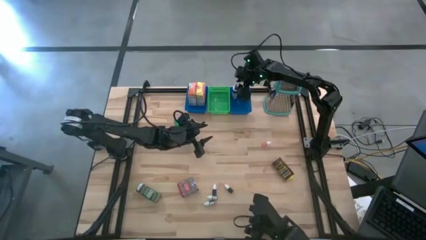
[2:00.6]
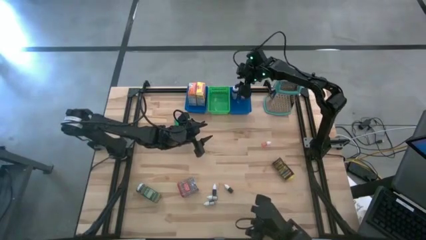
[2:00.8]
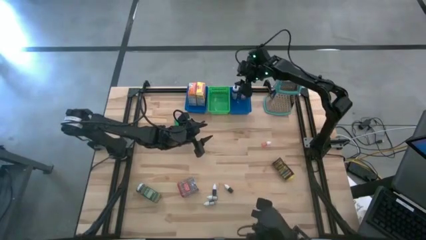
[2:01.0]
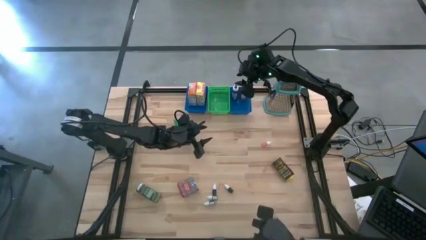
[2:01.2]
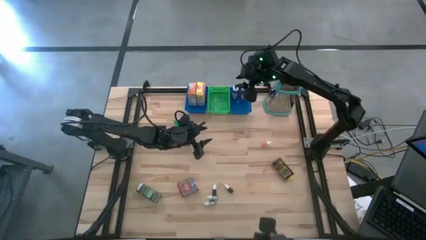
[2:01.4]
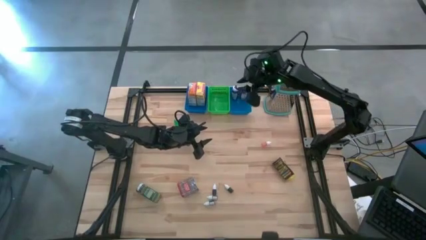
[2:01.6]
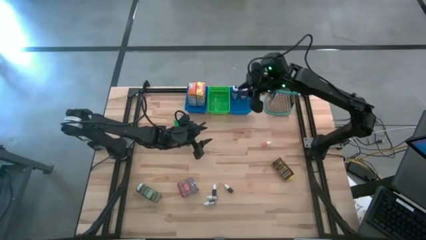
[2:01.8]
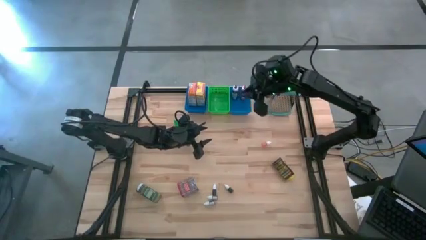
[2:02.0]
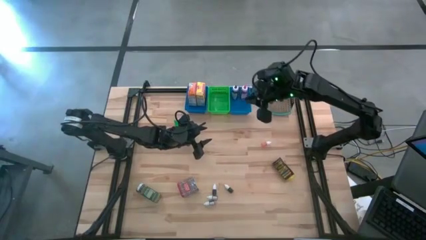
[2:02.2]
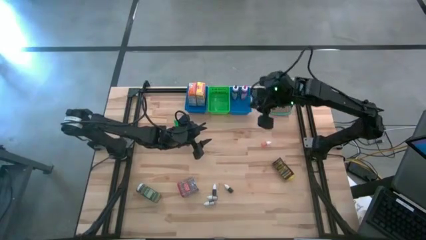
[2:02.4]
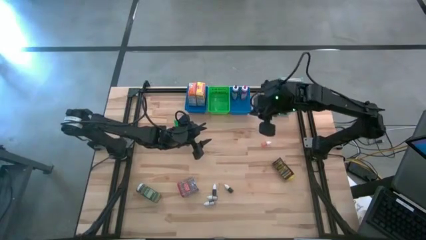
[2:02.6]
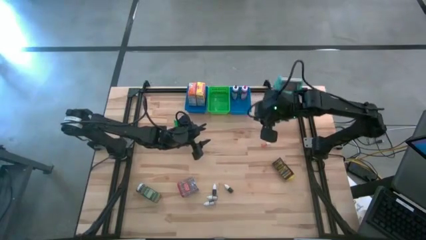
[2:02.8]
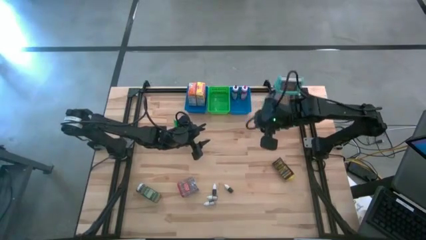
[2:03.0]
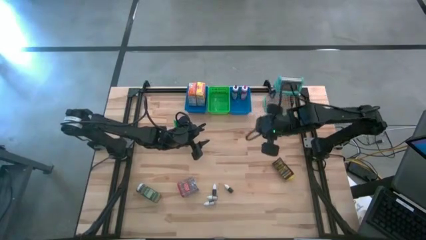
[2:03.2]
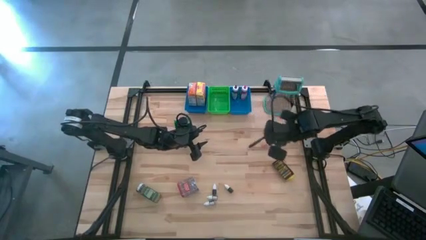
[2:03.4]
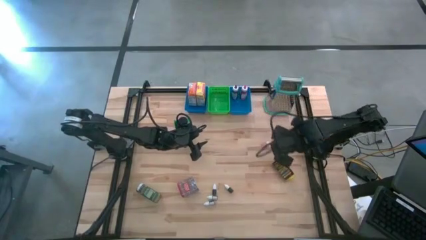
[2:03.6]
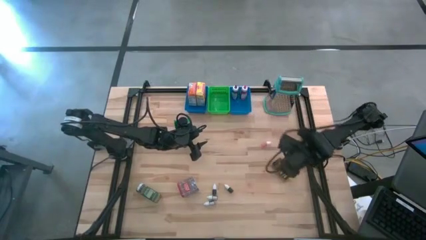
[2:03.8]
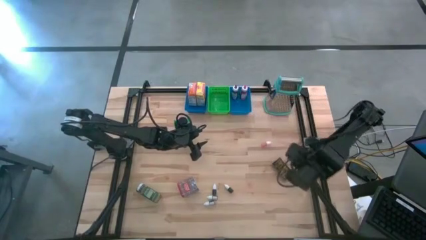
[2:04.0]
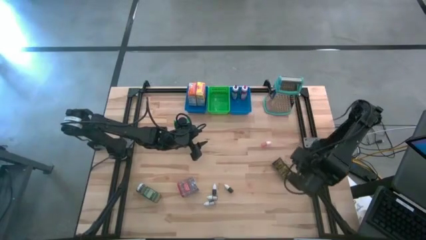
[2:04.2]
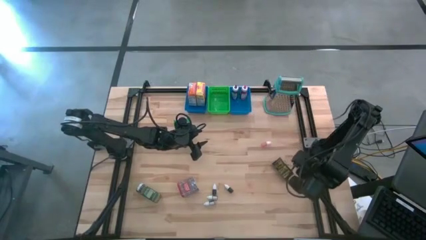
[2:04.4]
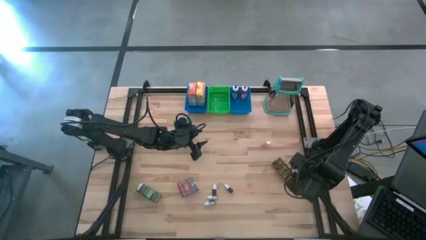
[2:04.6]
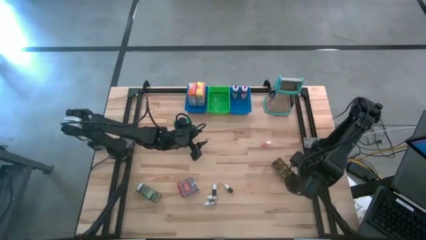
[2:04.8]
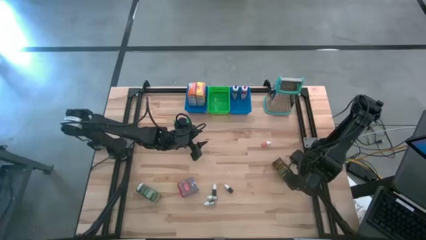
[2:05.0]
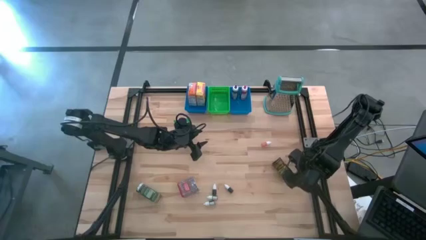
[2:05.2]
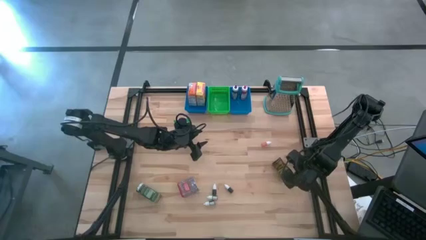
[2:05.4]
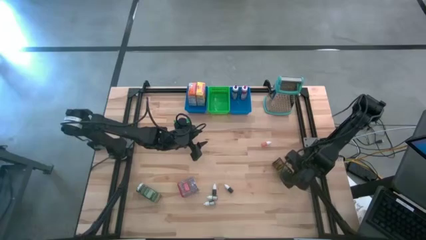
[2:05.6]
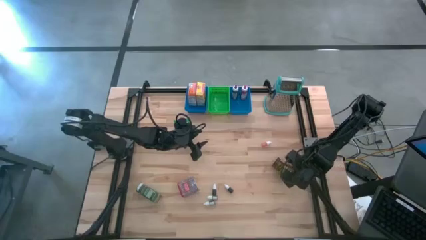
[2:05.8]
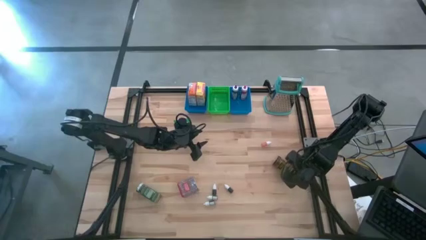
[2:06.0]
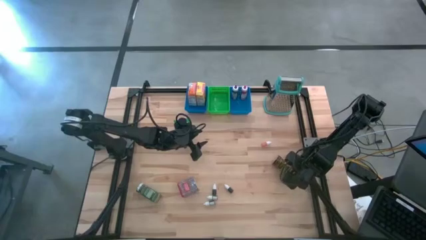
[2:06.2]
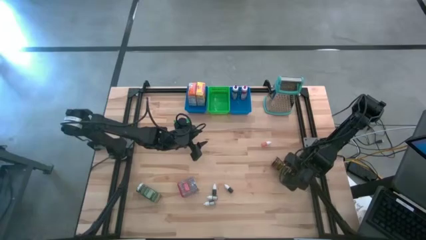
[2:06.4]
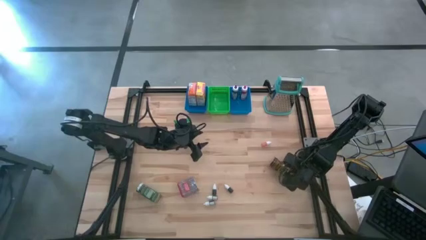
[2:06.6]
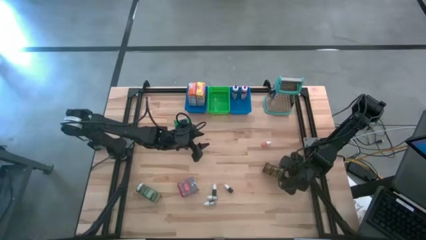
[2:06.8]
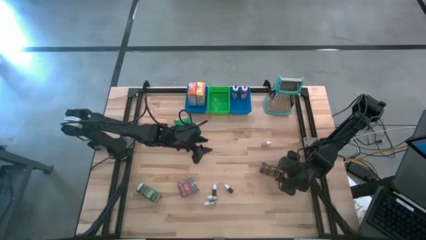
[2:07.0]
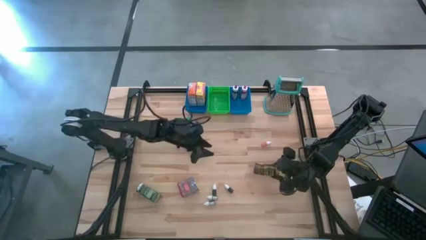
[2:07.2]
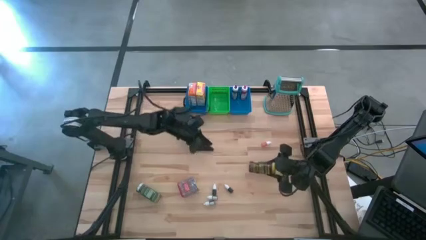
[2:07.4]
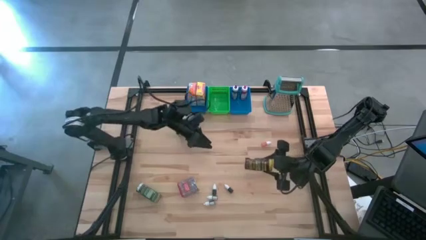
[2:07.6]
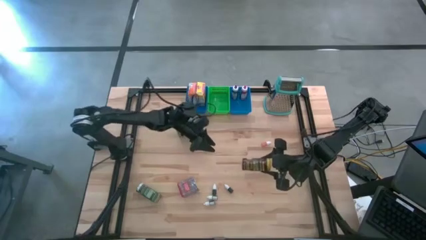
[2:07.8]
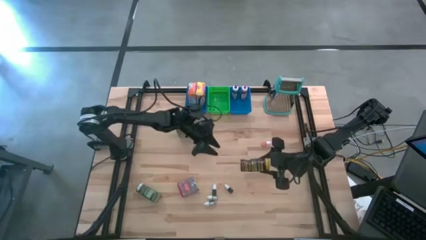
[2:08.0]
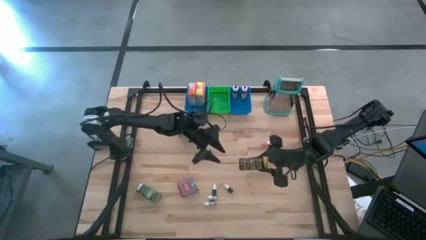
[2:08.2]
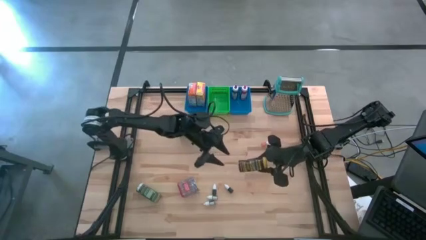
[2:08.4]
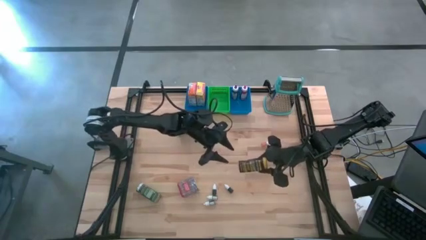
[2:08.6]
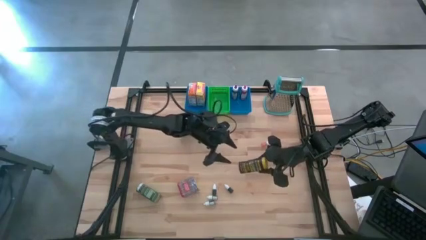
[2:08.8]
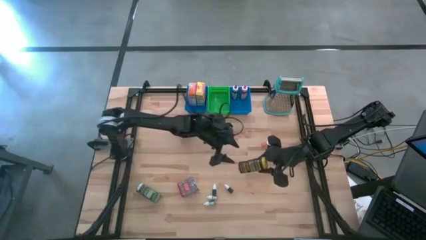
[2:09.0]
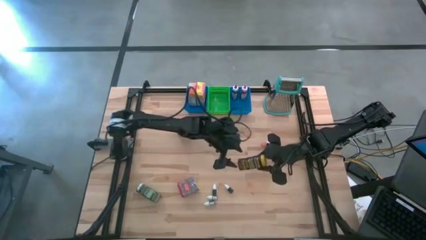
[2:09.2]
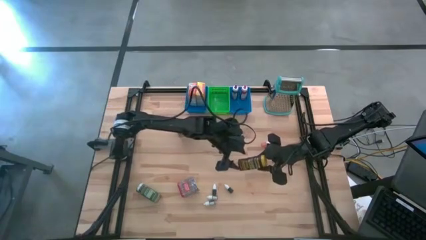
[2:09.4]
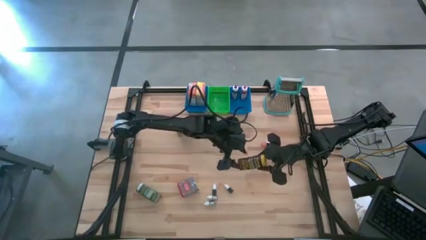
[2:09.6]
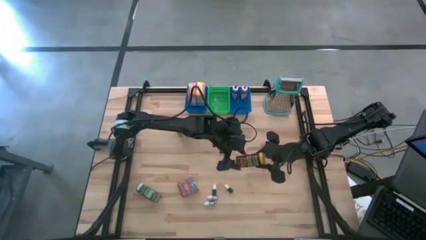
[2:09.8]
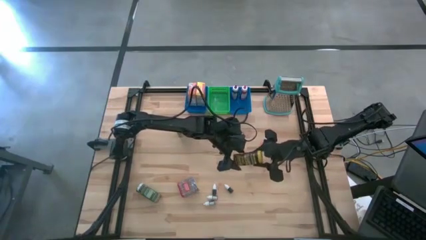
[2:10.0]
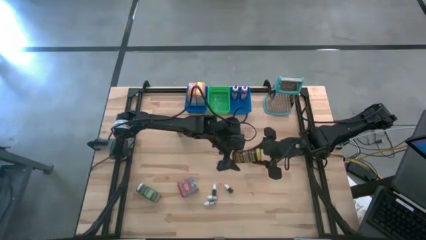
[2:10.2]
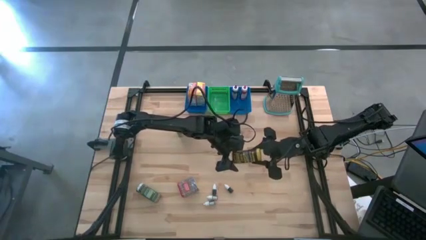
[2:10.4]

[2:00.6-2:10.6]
Task: Pick & Place Kitchen Items
Put the yellow seasoning can into the green bin

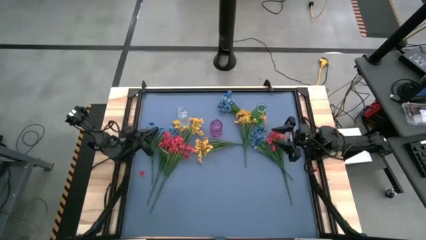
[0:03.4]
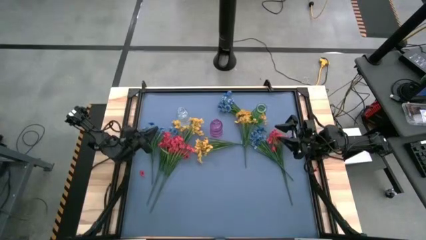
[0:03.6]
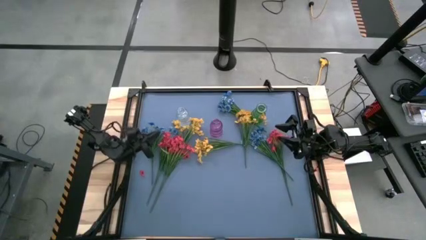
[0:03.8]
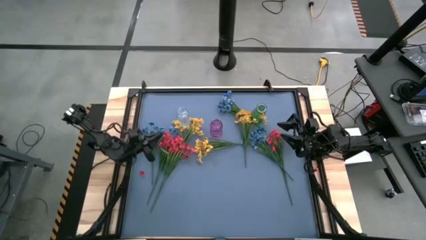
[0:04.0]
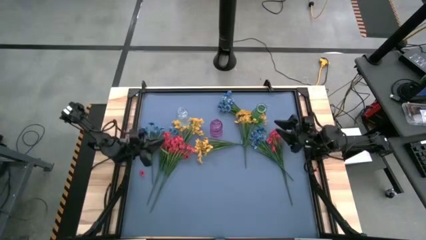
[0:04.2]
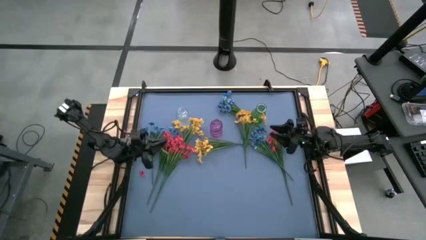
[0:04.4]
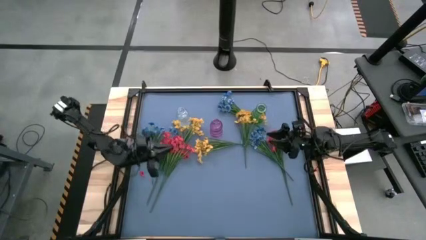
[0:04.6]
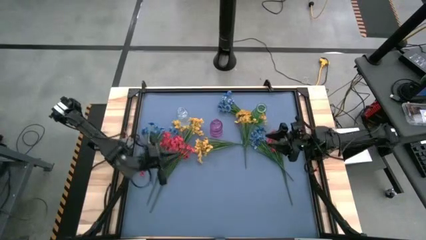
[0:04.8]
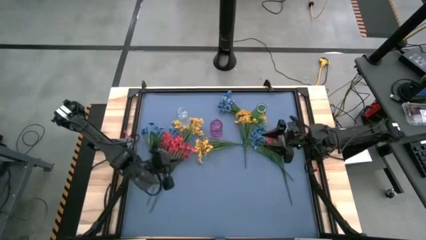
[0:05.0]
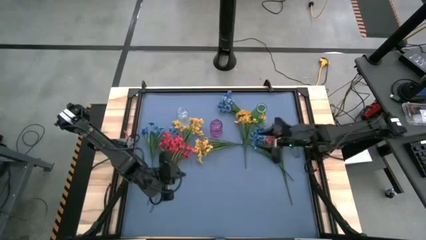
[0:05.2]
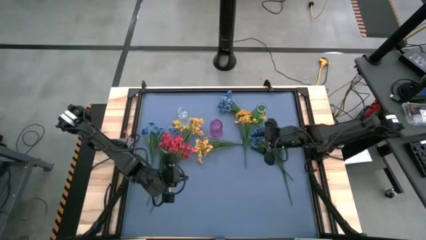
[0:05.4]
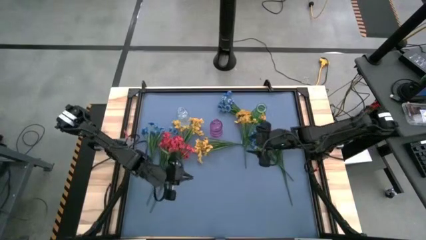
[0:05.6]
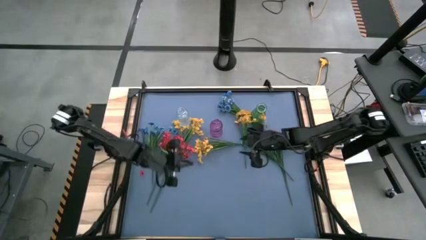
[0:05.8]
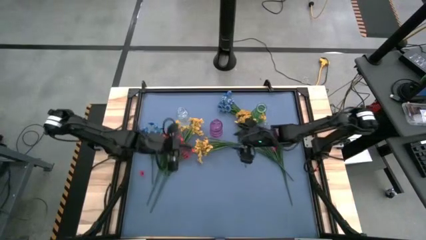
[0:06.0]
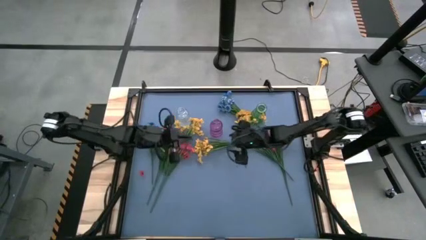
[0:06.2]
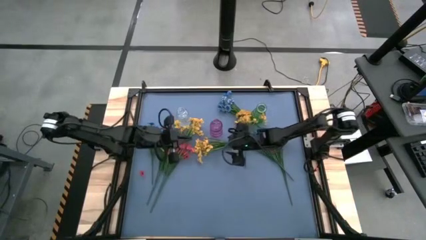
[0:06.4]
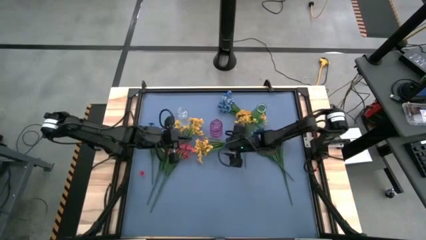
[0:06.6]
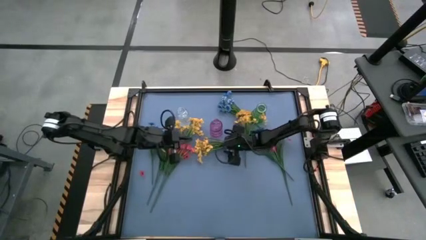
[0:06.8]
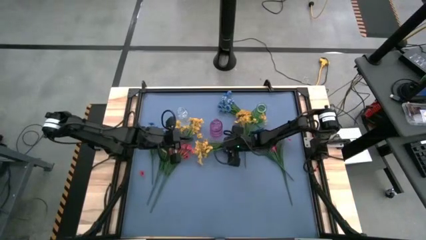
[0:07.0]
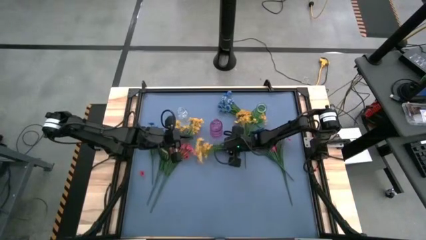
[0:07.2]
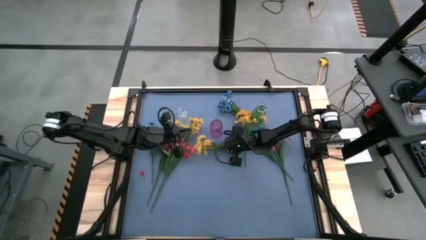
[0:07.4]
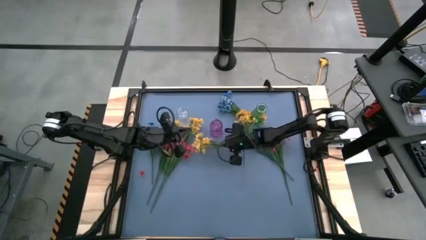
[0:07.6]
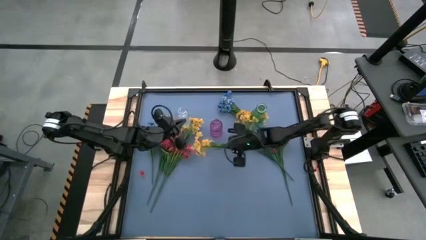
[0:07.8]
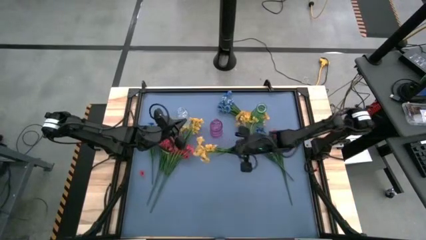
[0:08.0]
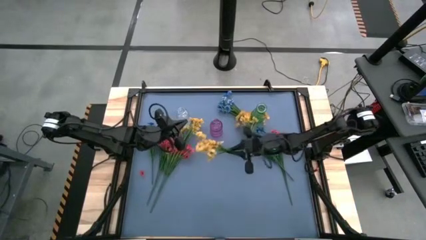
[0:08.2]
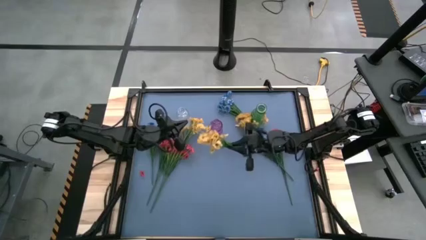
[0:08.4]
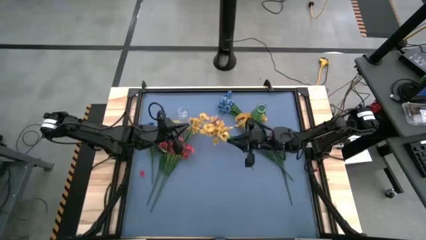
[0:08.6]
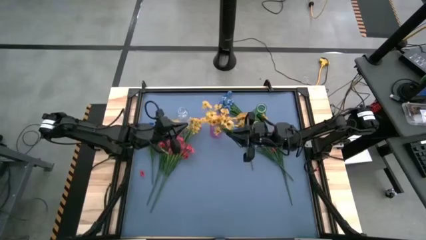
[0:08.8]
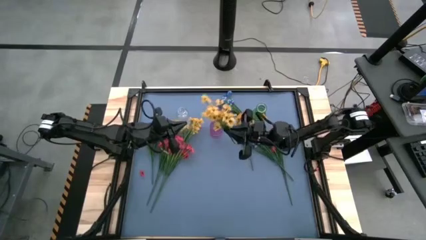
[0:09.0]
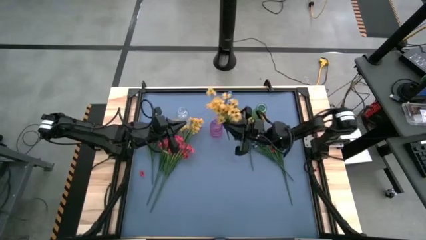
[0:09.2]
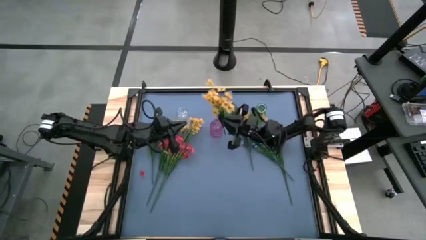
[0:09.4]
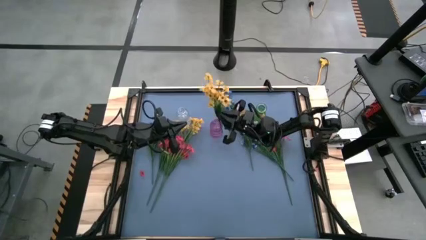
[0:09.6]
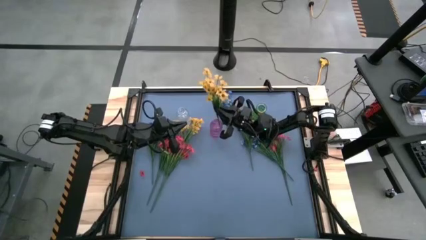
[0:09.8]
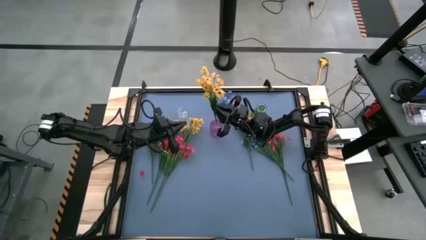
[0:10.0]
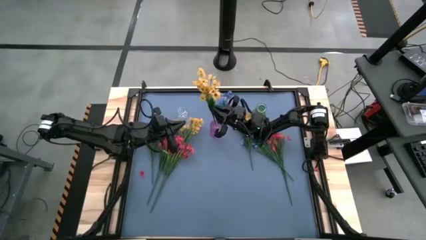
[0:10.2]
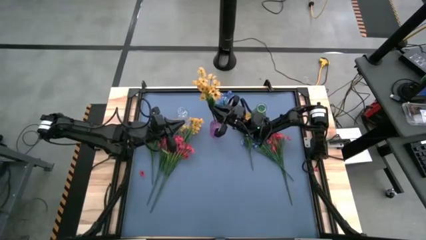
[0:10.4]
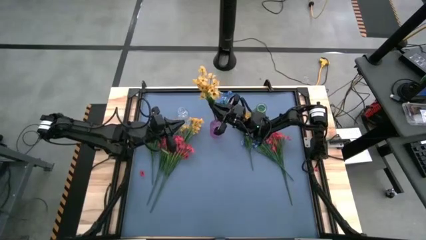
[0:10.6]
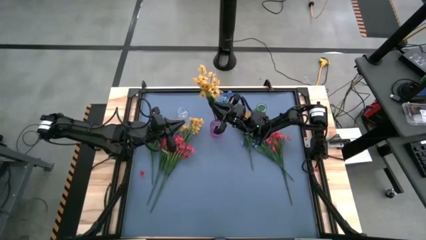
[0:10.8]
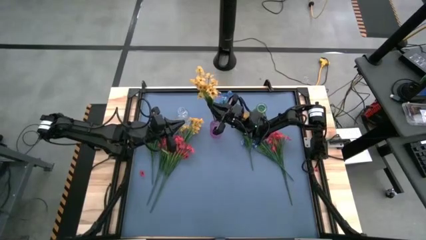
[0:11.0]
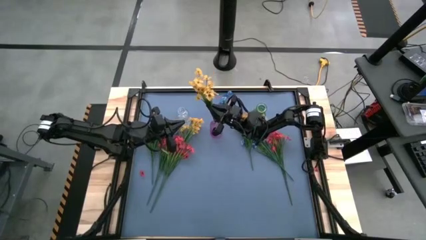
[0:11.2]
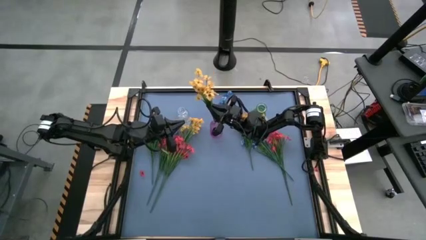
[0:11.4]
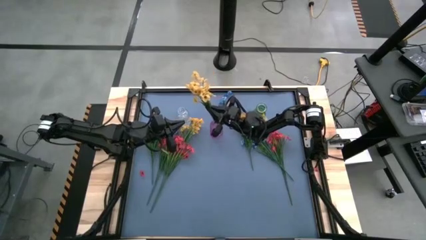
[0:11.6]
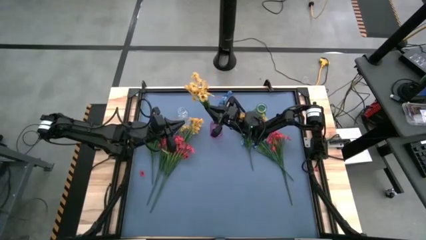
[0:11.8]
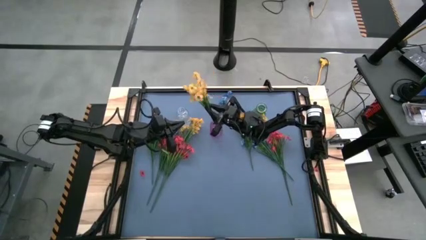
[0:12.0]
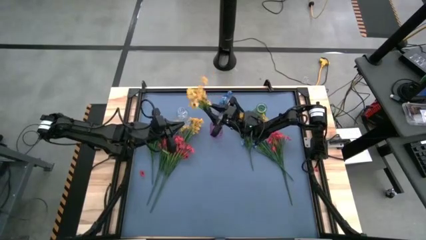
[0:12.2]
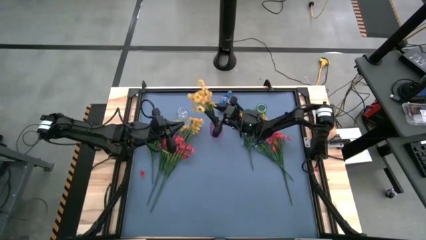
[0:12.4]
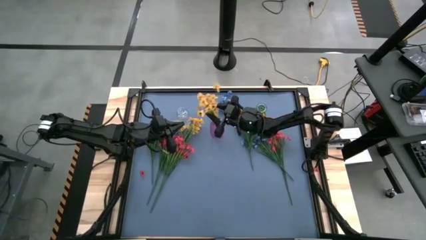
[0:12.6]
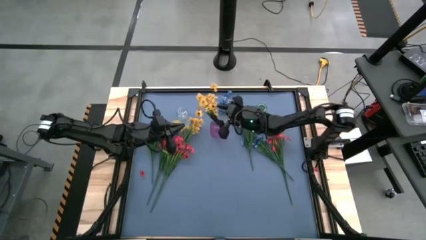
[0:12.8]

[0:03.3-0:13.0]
Task: Sort flowers into vase by color
Put the bottom yellow flowers into the violet vase
